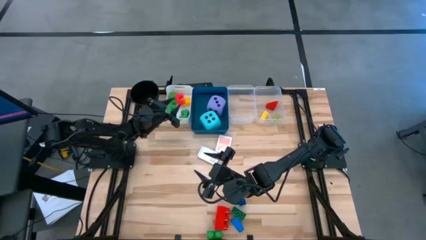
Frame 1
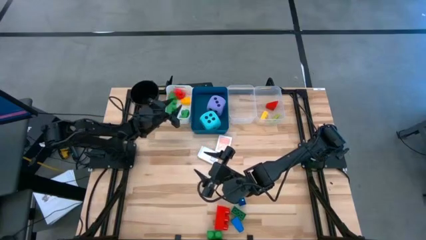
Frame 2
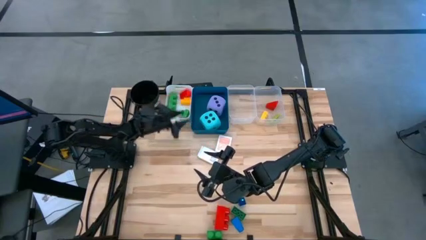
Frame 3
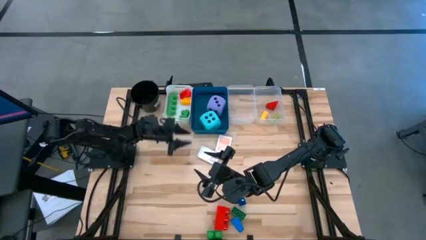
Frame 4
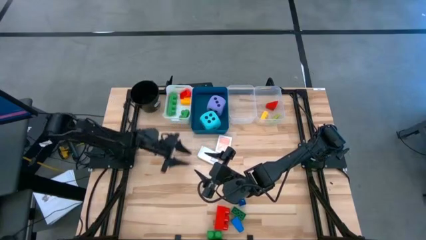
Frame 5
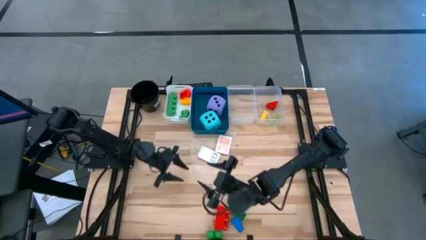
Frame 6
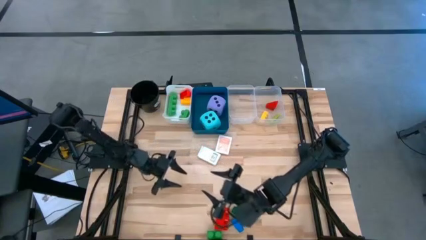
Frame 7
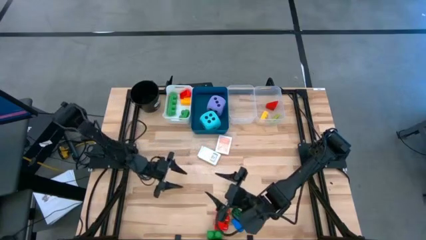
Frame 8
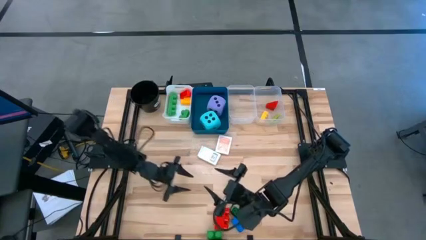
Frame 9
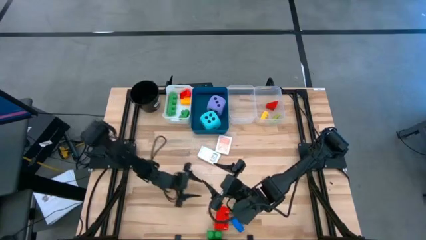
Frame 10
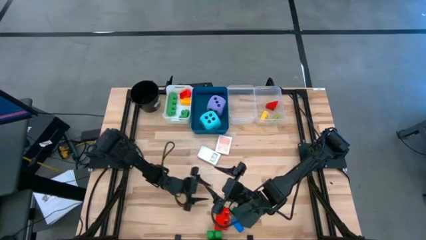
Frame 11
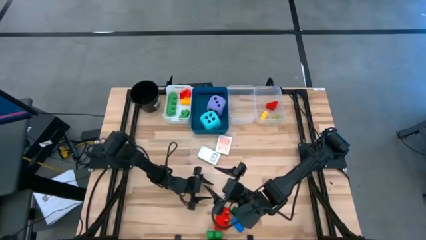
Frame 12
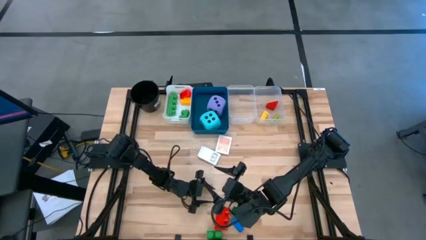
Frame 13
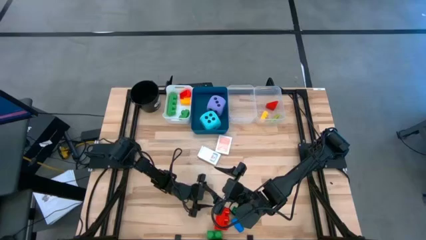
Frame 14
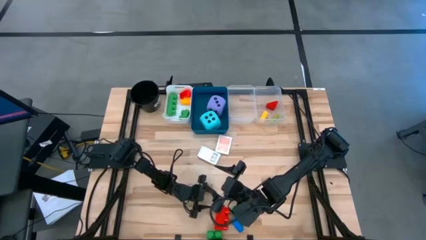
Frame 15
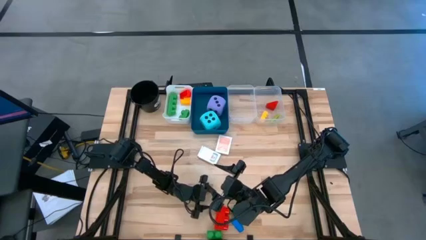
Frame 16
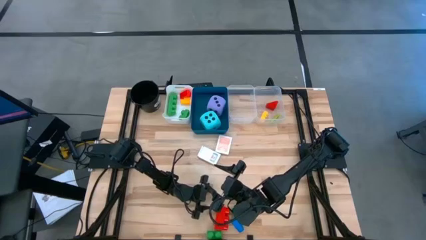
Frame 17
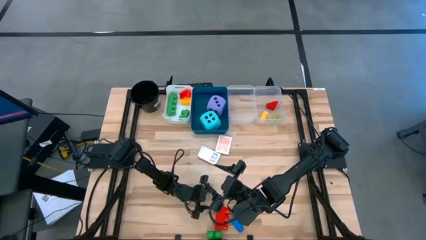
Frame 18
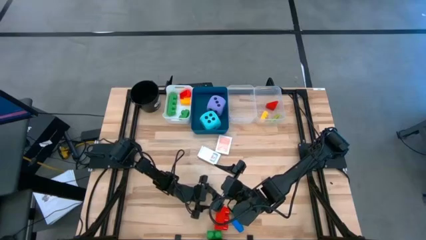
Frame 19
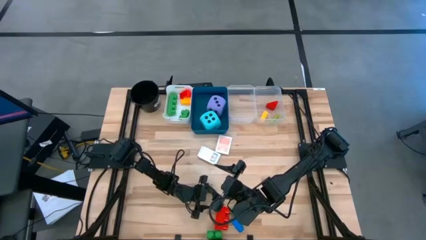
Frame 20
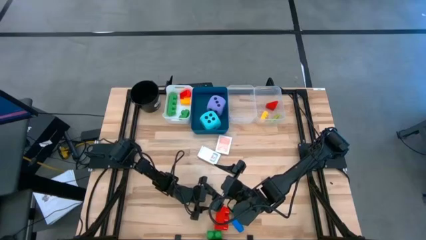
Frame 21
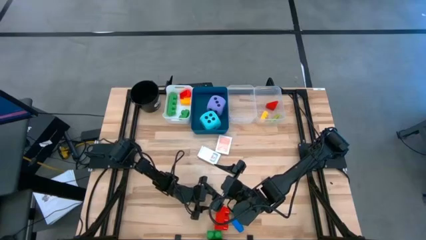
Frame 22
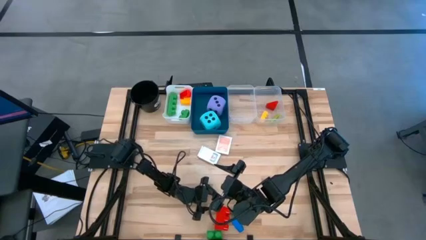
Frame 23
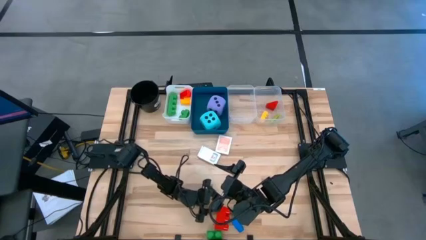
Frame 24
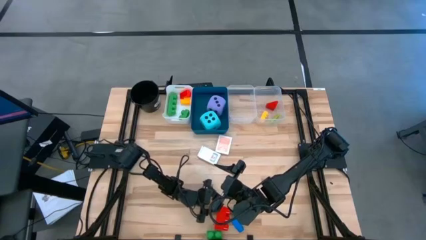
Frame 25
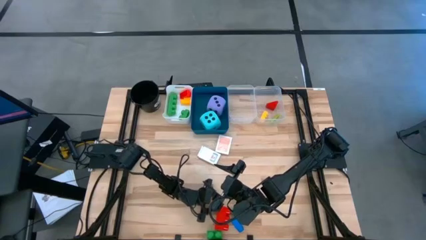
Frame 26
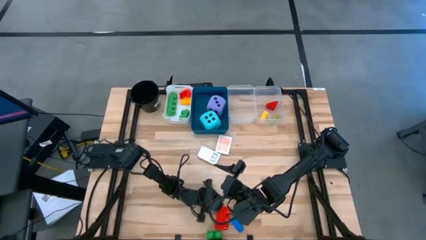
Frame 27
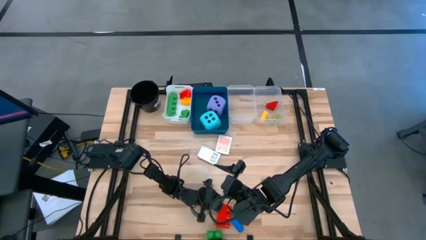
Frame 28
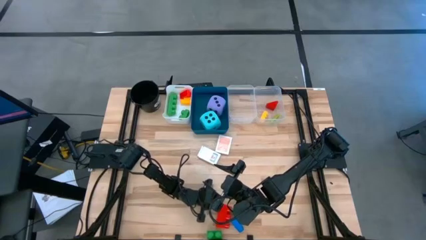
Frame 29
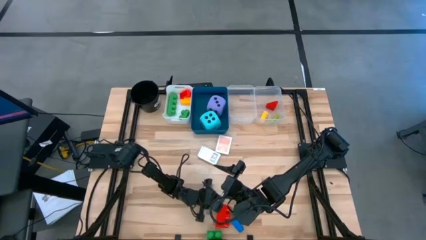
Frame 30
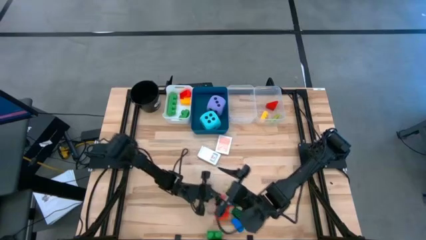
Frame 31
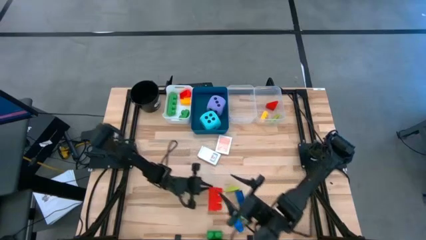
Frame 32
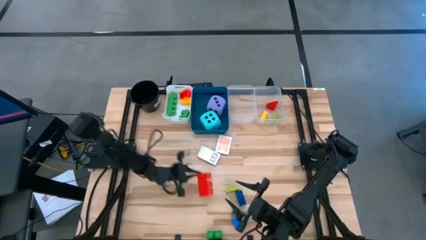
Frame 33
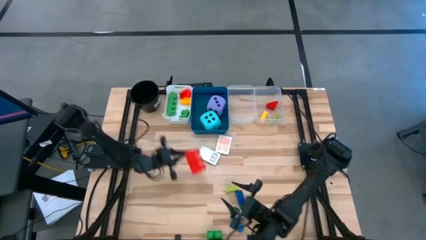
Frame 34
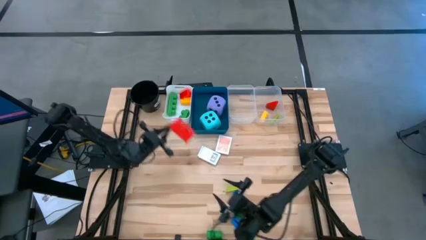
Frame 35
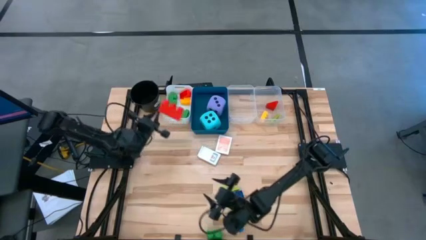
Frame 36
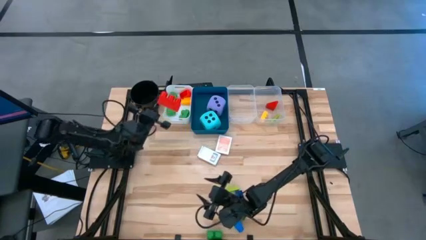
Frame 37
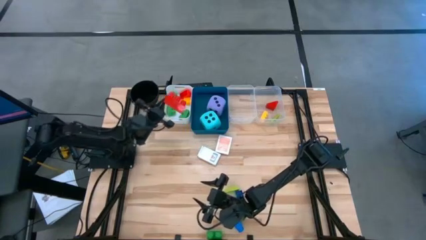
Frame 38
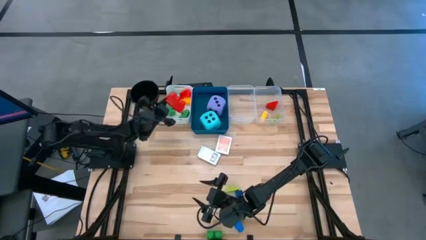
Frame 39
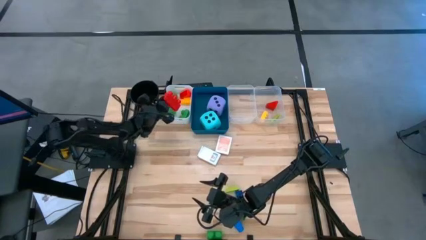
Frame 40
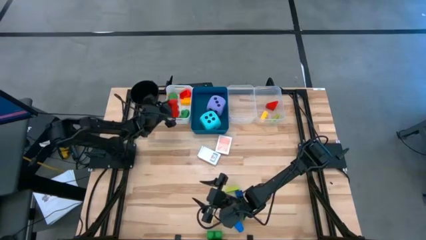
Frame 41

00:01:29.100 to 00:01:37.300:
Task: Pick & Place Toys
Put the large red game piece into the white bin

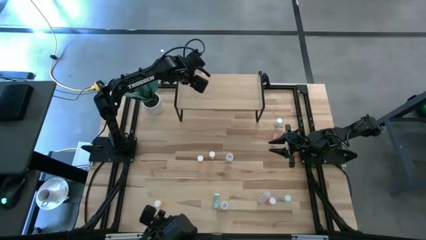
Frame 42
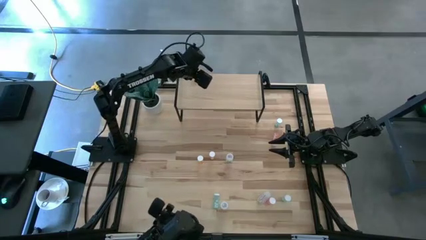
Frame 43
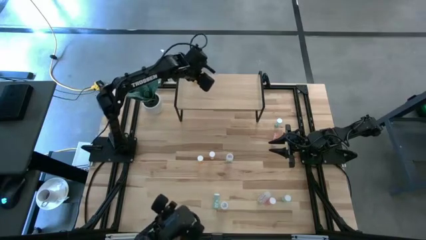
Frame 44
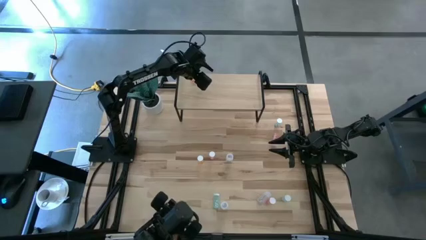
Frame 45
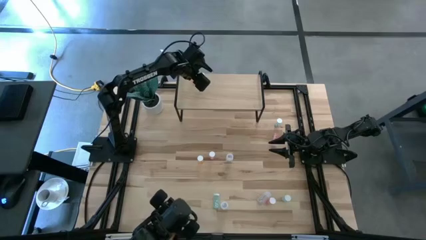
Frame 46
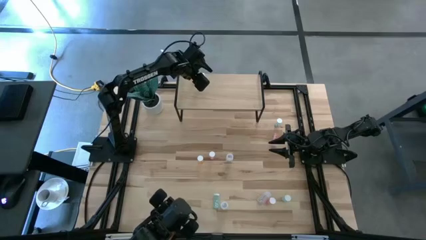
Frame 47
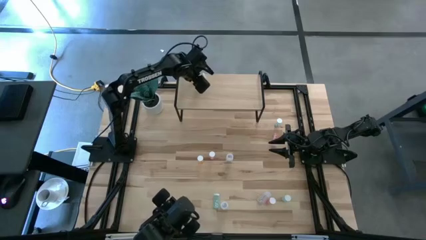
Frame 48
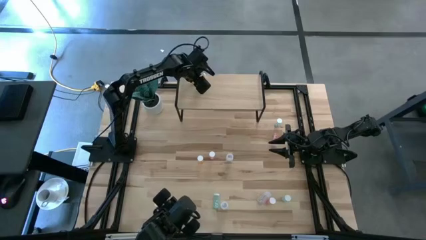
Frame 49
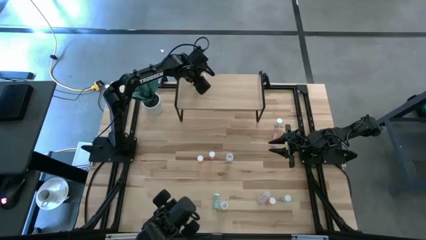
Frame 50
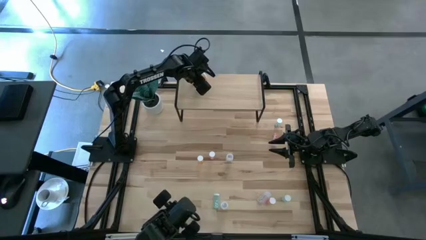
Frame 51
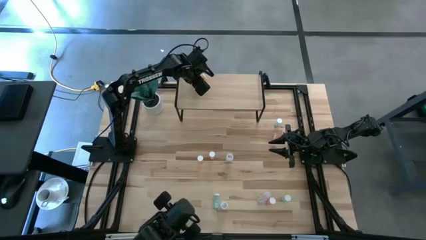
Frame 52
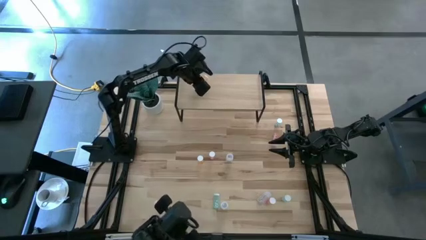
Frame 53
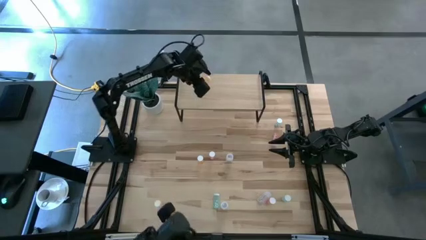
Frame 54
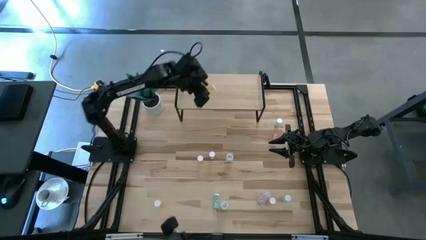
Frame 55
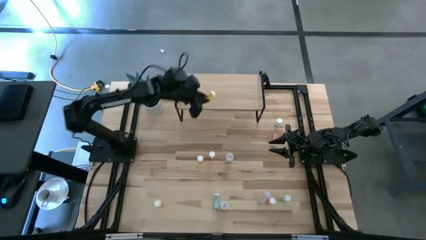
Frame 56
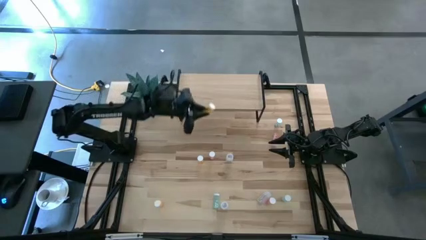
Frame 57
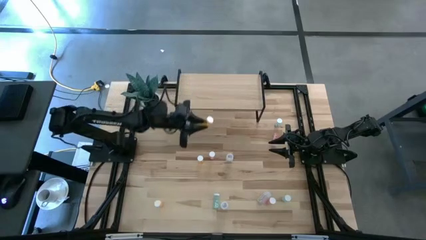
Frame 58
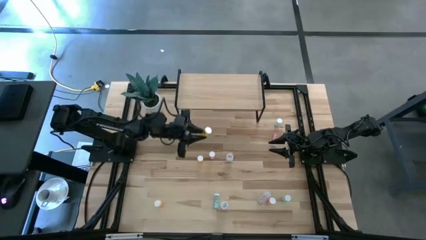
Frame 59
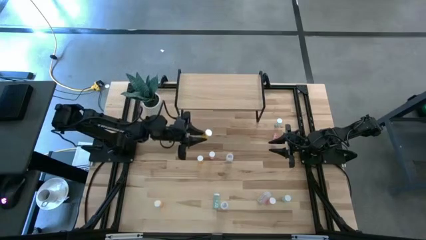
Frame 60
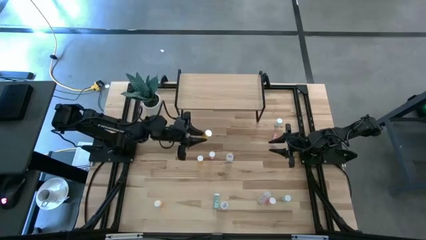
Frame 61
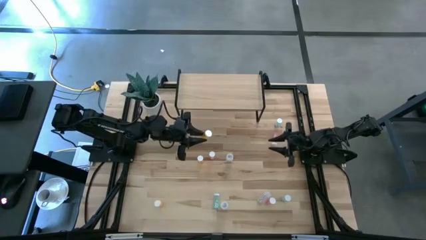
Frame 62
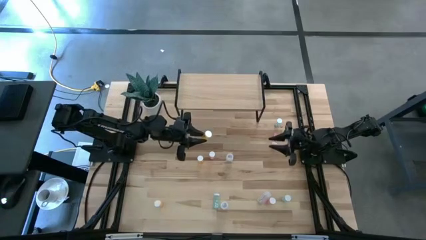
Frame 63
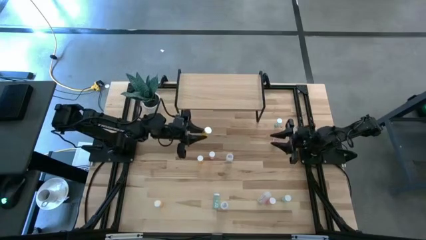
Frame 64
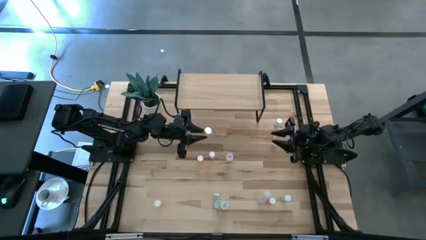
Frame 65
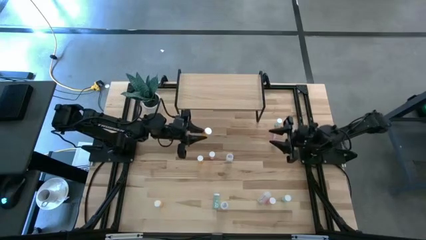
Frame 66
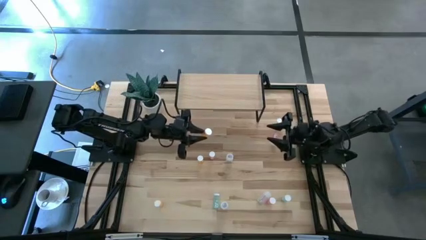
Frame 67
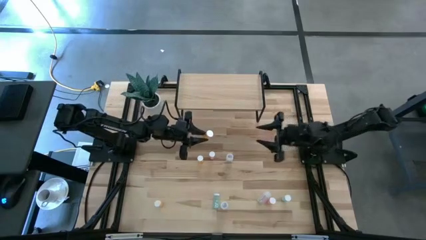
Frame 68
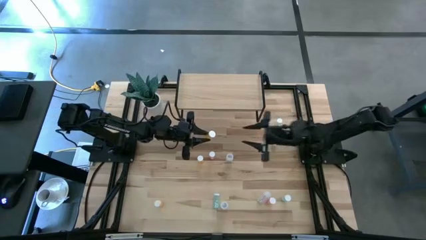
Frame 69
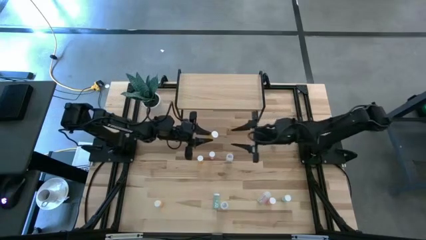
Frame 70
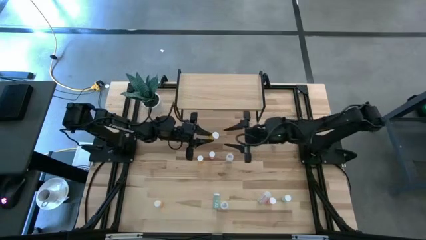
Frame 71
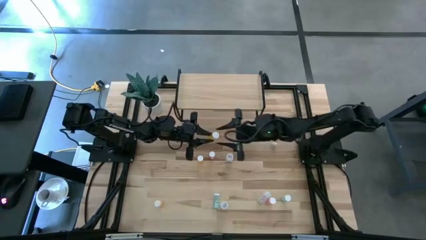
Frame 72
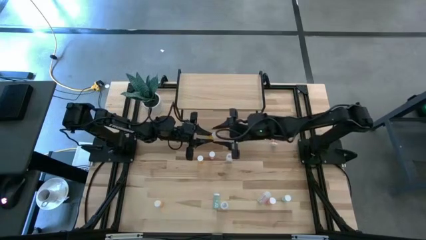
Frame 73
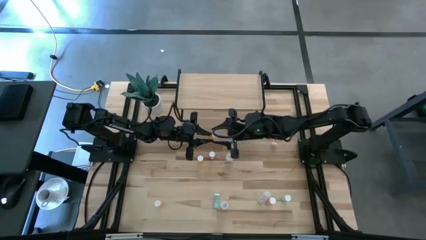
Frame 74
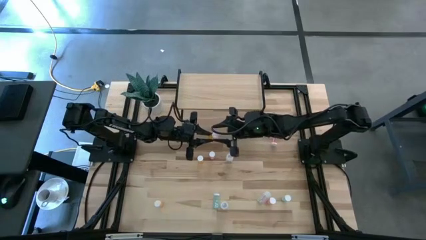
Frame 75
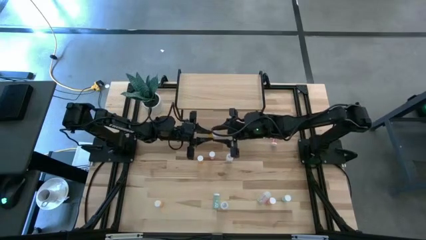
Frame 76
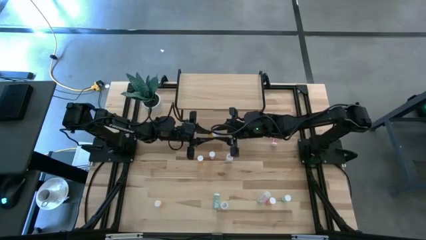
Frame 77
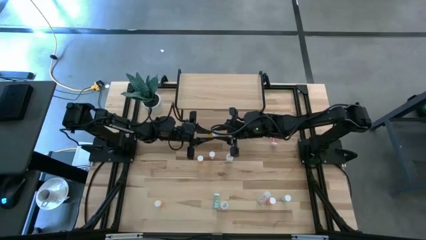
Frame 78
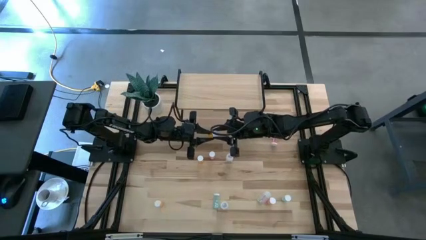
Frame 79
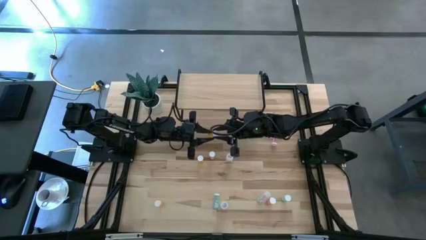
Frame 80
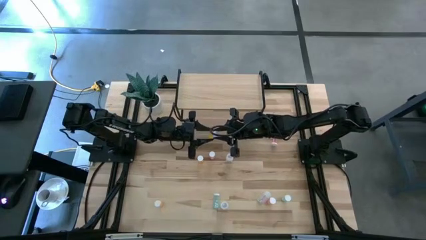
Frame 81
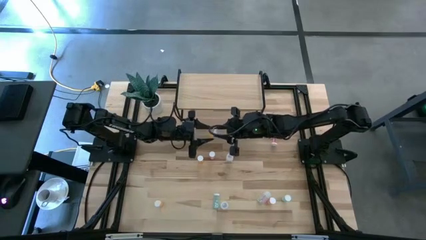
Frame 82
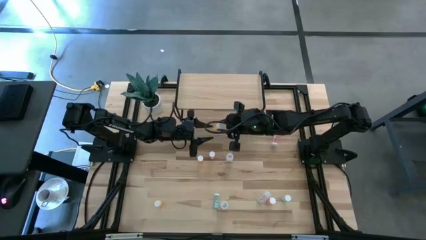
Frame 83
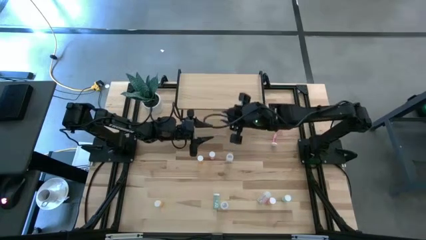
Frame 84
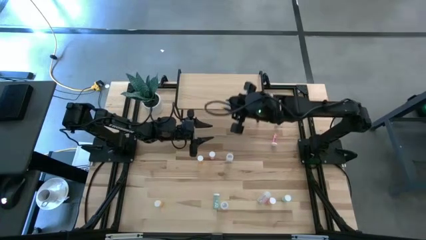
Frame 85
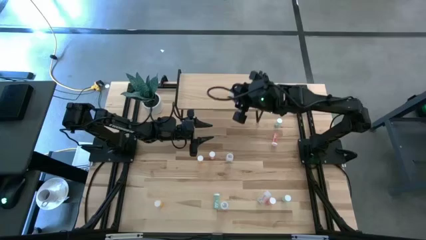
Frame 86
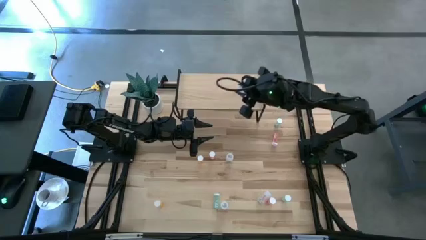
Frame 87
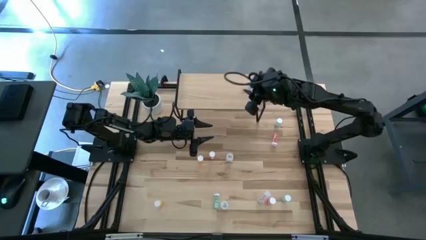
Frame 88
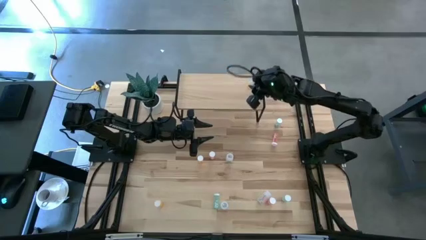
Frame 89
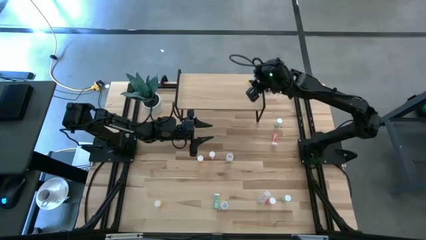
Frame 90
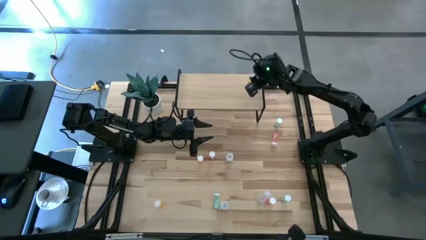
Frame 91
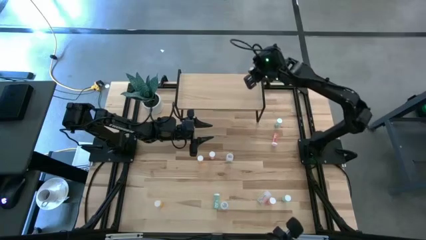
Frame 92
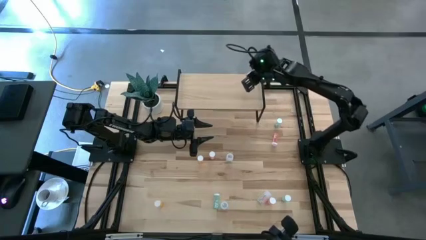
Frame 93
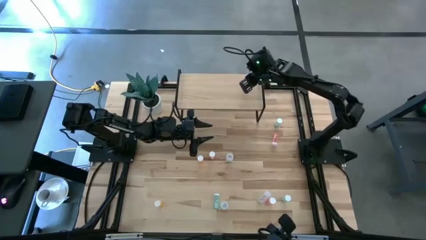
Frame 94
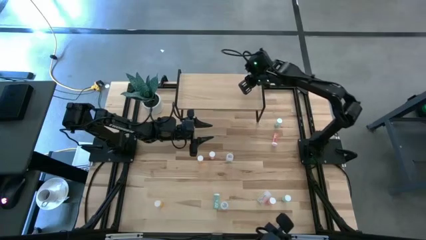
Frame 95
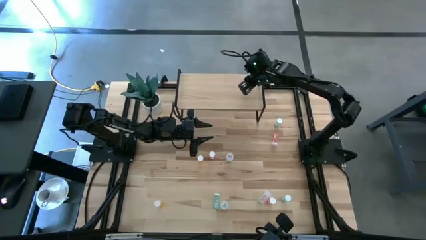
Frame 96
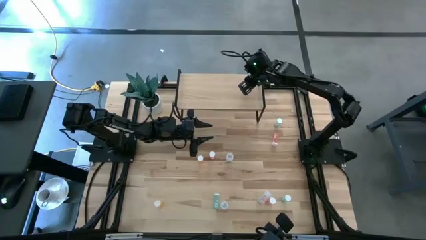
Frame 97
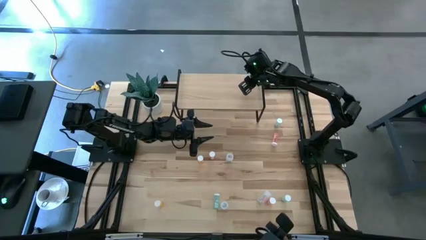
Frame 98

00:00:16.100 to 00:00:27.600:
Task: Pick and place medicine bottles onto shelf by color
Put the top left orange pill bottle on the shelf
